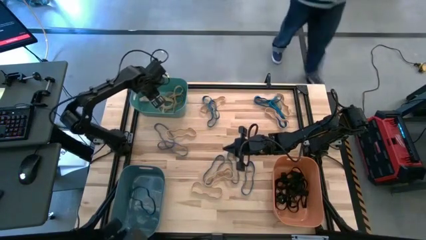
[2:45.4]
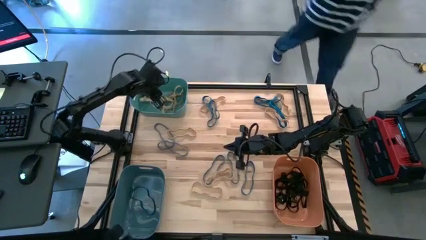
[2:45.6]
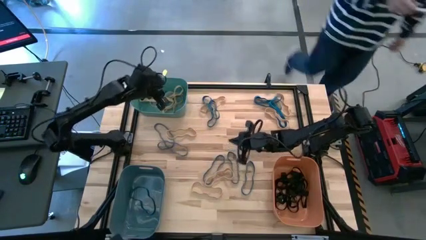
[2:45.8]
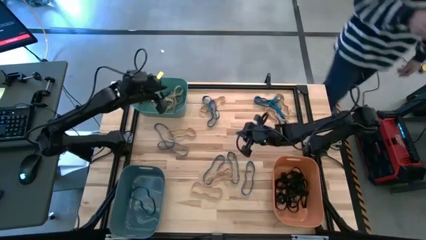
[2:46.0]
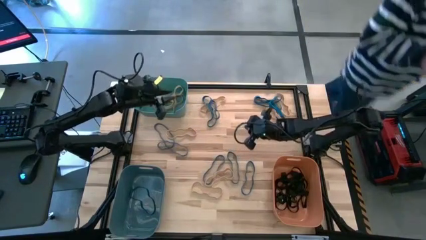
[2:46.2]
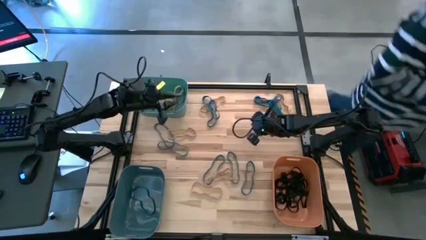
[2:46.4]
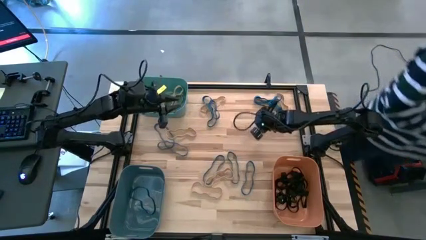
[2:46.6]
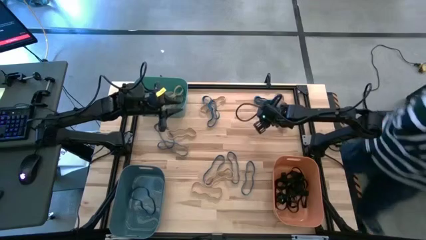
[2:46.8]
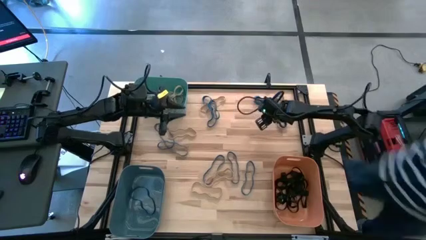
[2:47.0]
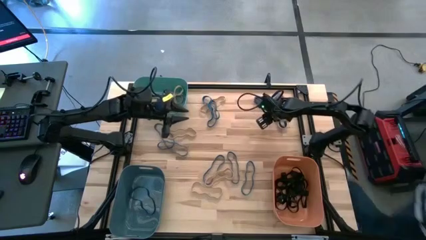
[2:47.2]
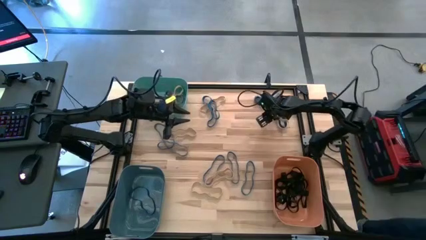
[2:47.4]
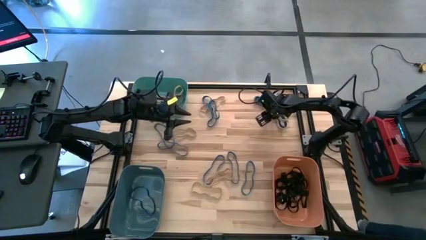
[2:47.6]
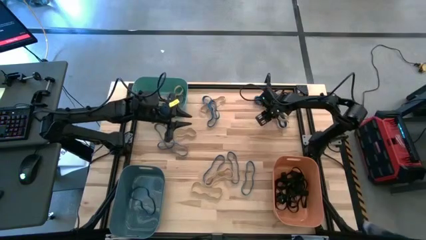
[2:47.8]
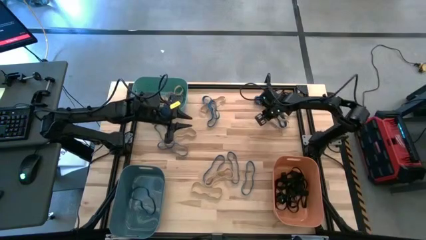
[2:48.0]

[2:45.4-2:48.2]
Task: Sort rubber bands into baskets
Put the brown rubber band into the green bin

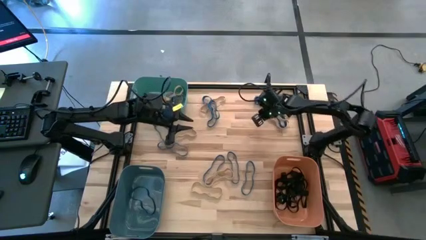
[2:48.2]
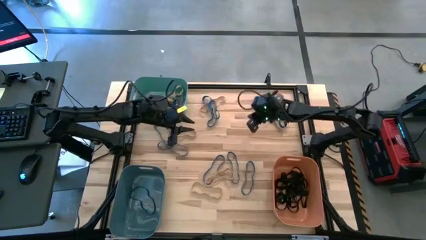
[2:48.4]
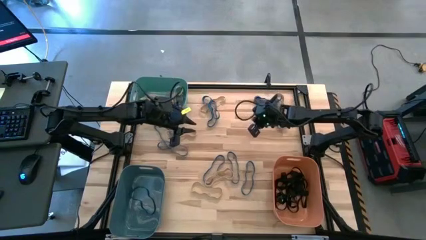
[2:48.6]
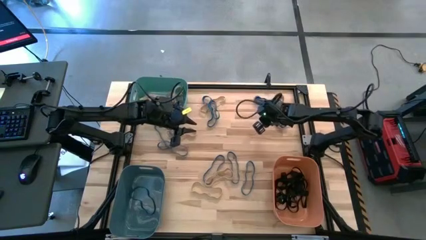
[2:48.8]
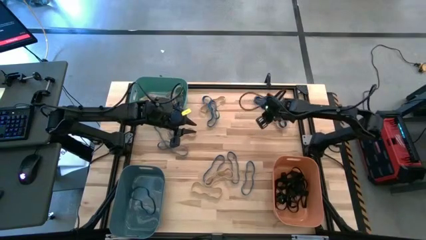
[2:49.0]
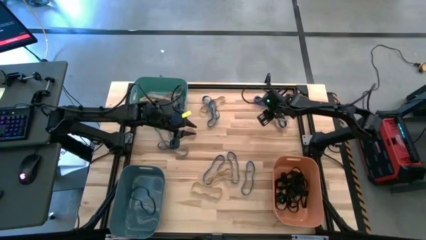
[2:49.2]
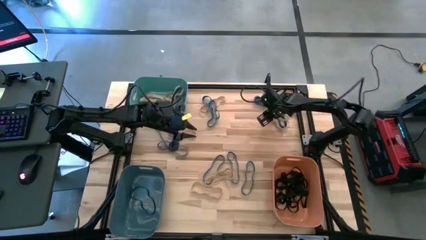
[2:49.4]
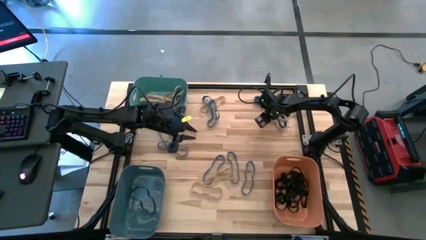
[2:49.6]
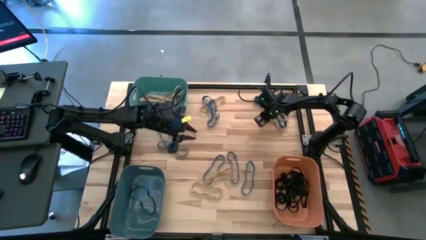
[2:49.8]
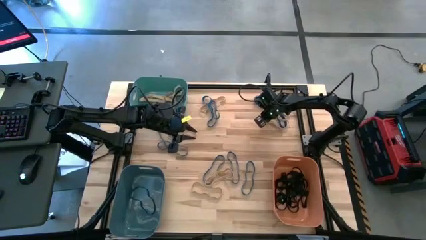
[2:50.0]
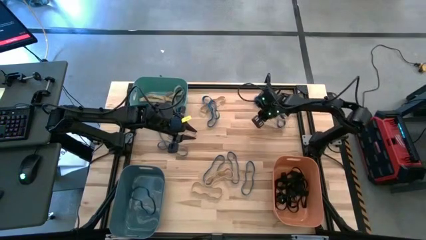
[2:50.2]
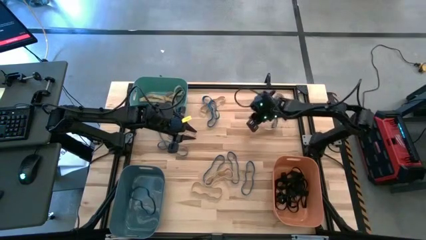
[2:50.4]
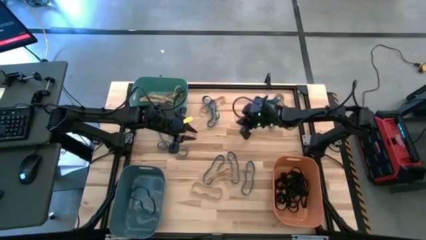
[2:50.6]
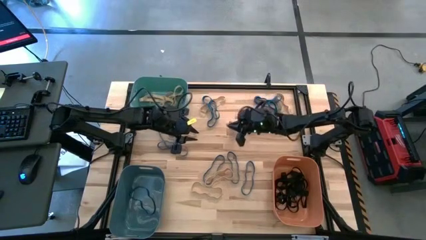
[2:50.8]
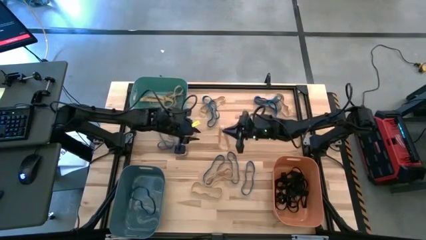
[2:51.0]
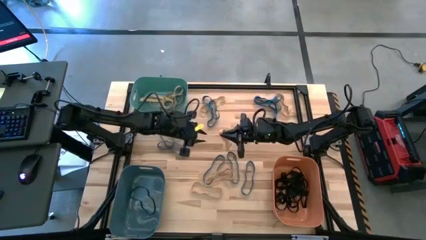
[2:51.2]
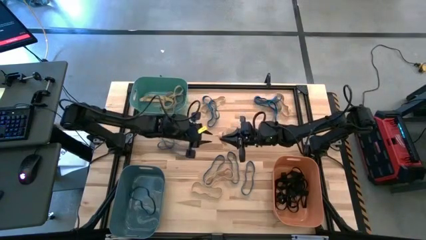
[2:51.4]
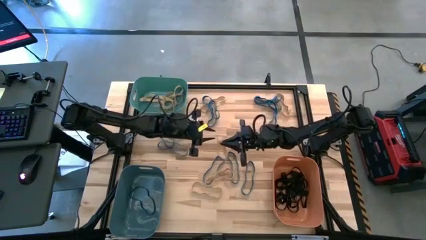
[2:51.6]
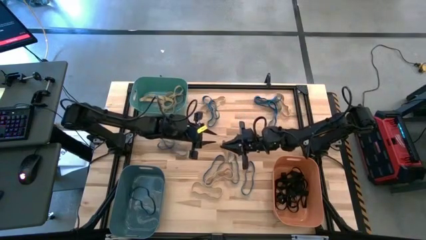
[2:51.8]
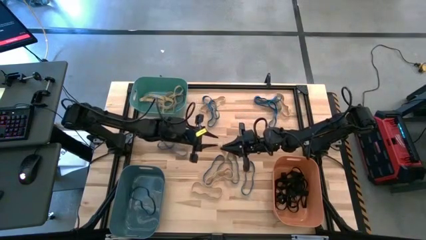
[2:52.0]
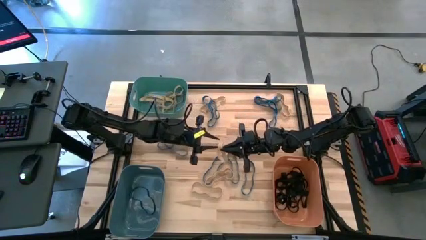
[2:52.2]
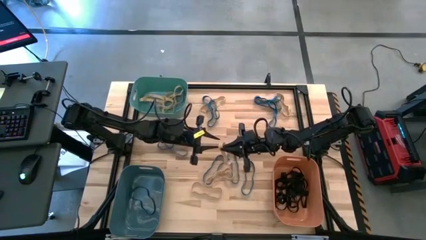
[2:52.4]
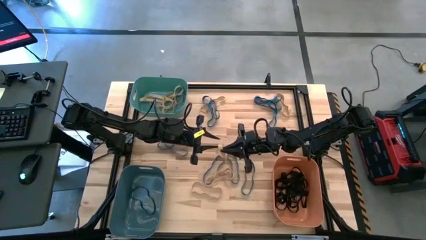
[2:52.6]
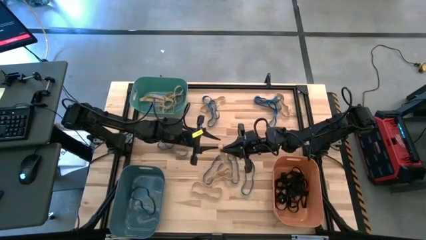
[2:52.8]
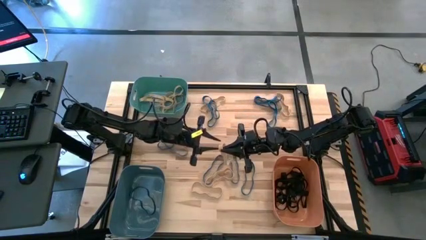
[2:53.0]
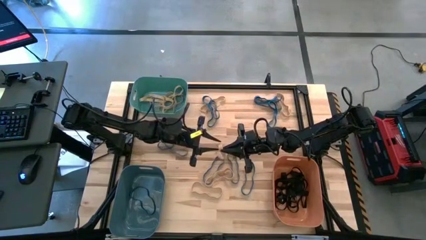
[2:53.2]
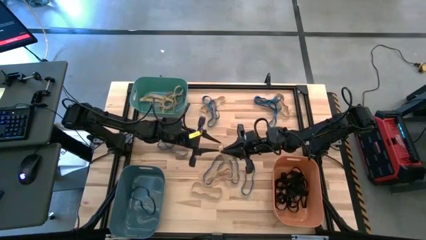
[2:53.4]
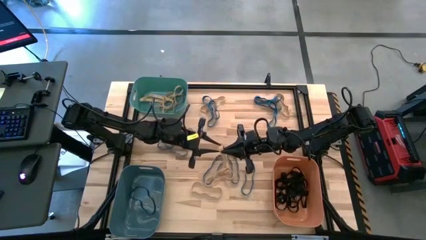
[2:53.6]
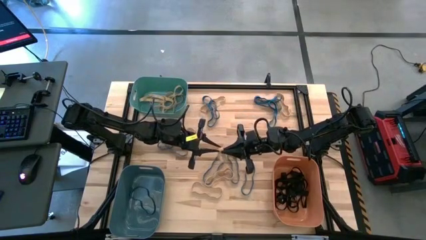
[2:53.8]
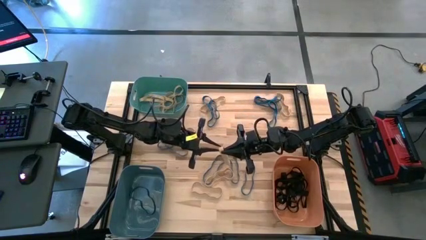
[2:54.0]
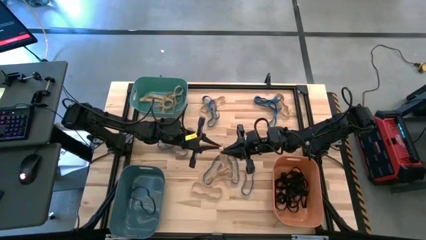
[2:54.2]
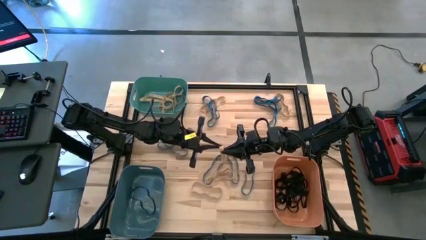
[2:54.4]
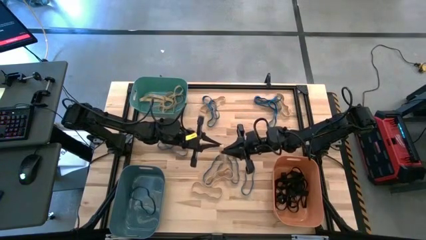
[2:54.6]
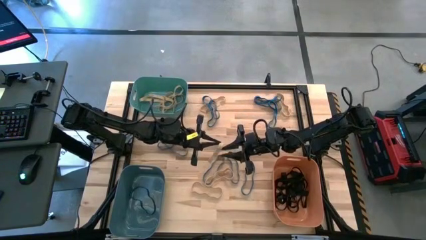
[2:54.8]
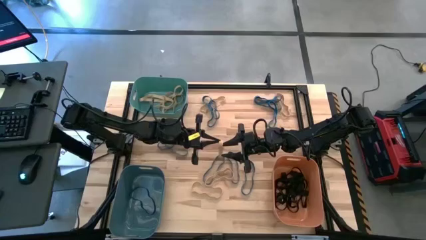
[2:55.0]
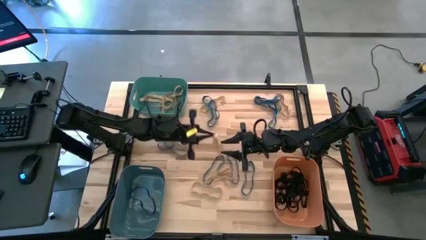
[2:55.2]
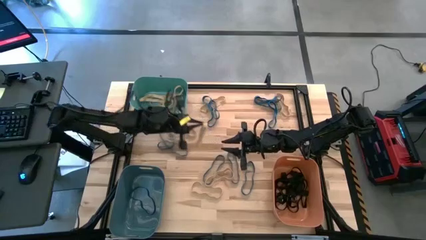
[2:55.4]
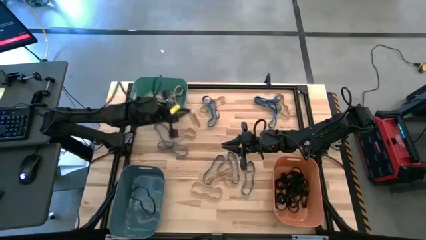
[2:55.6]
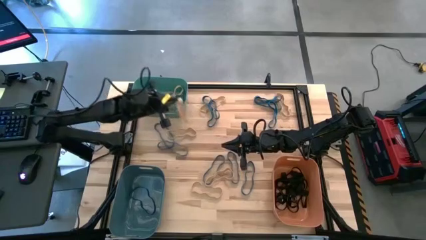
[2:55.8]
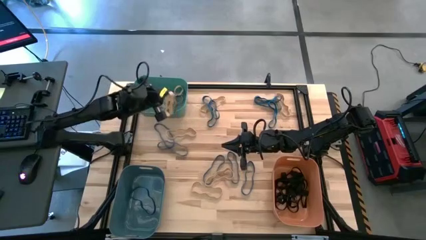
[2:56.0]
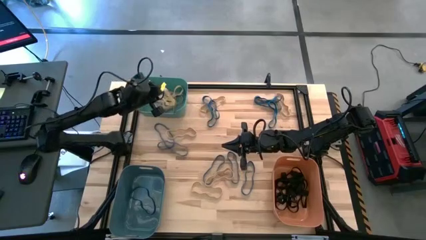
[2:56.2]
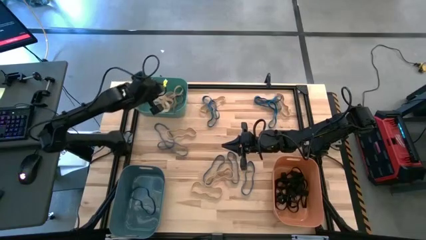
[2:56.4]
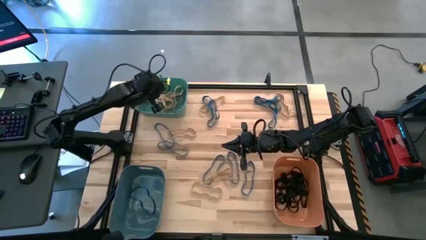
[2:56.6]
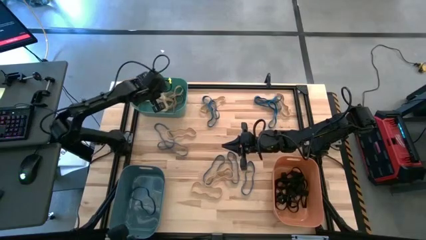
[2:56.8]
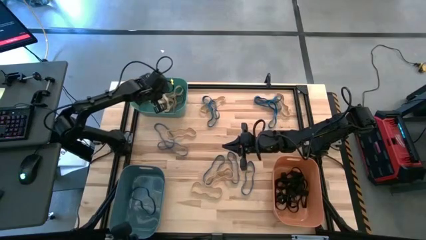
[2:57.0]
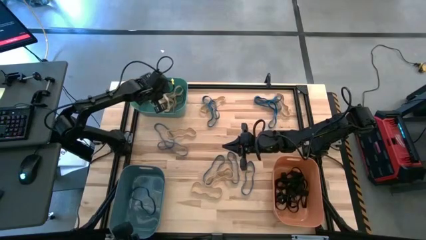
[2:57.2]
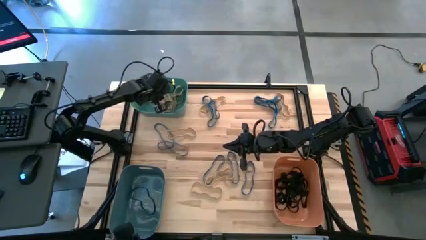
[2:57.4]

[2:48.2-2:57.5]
Put the brown rubber band into the green bin

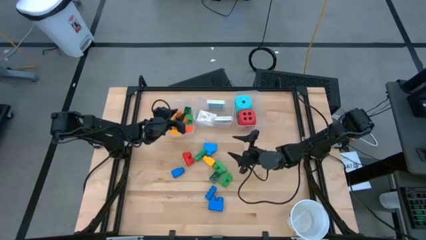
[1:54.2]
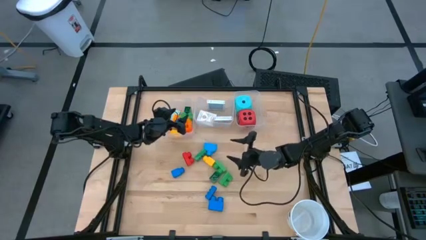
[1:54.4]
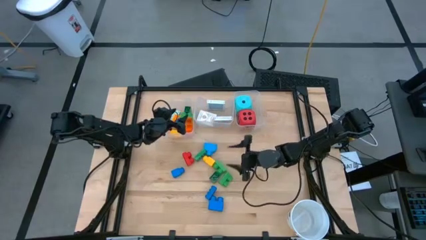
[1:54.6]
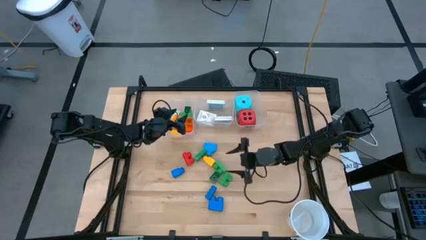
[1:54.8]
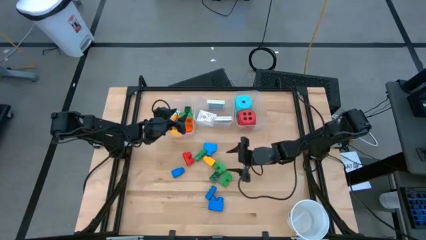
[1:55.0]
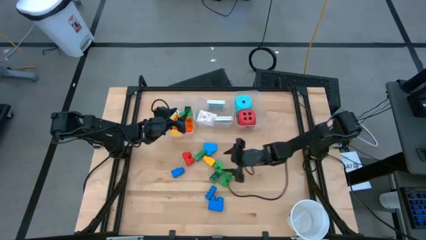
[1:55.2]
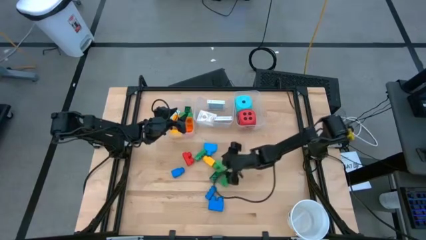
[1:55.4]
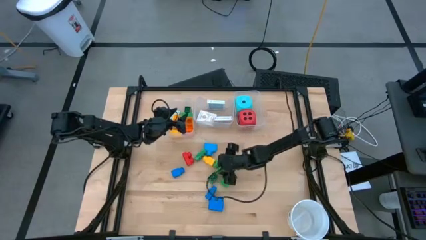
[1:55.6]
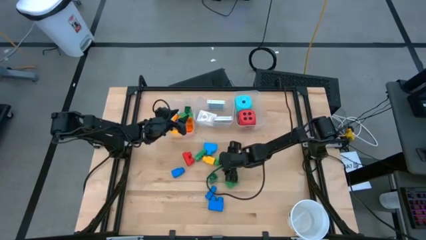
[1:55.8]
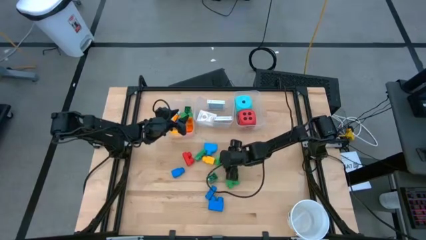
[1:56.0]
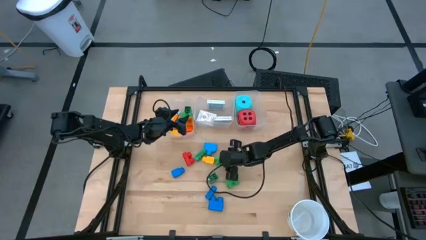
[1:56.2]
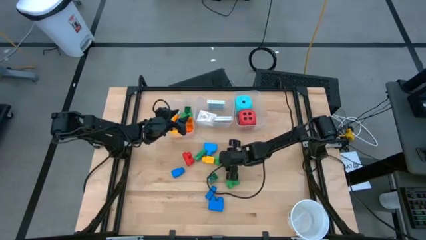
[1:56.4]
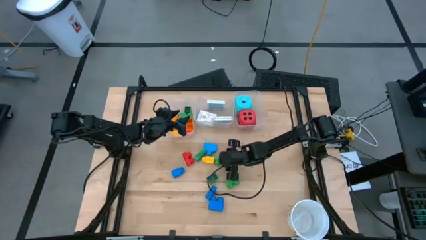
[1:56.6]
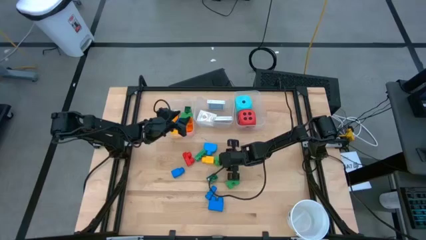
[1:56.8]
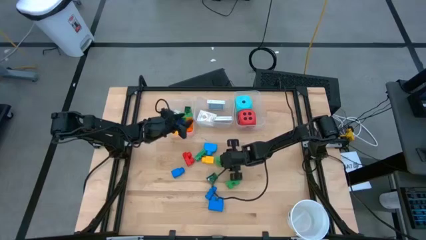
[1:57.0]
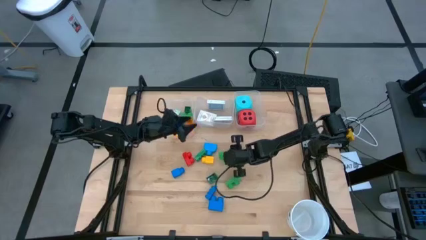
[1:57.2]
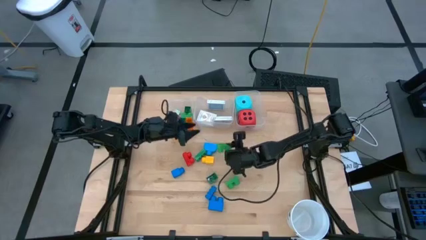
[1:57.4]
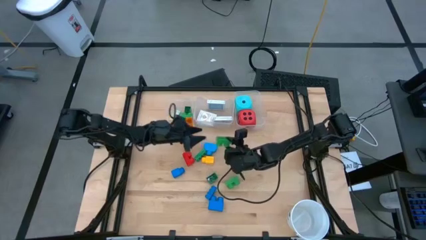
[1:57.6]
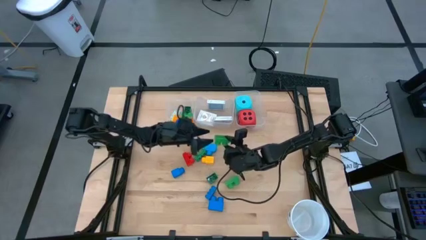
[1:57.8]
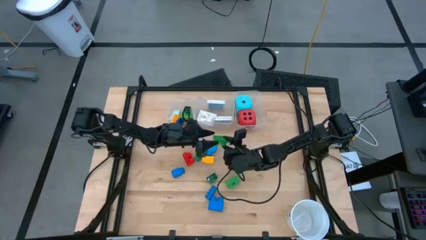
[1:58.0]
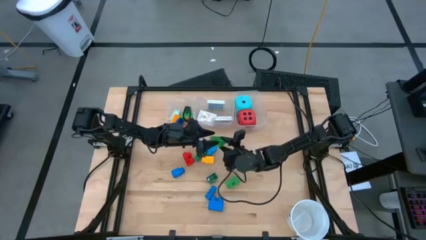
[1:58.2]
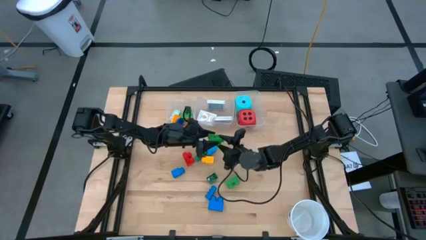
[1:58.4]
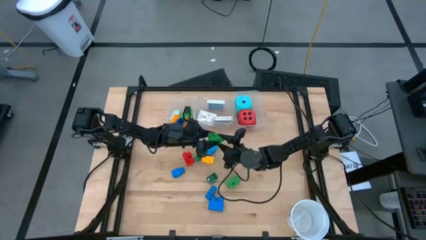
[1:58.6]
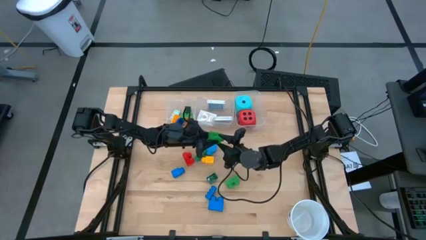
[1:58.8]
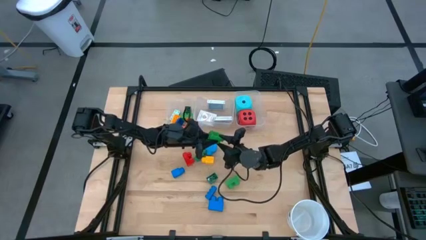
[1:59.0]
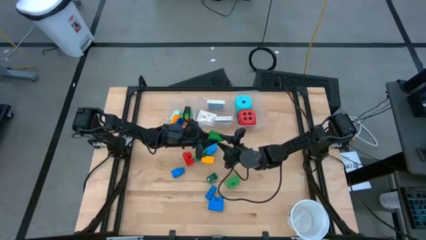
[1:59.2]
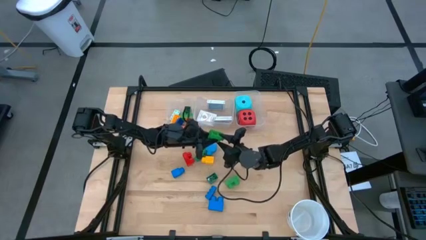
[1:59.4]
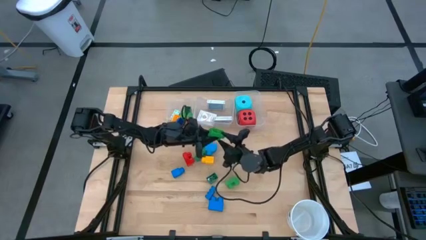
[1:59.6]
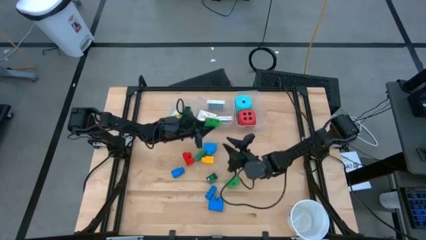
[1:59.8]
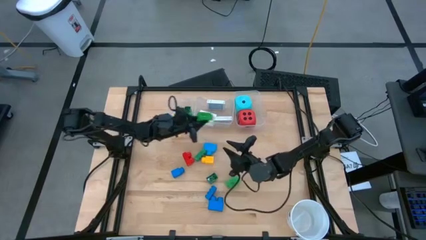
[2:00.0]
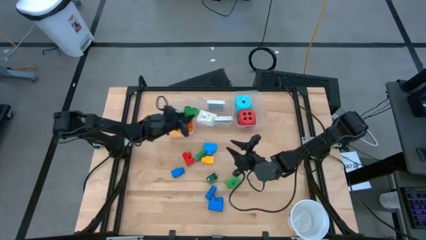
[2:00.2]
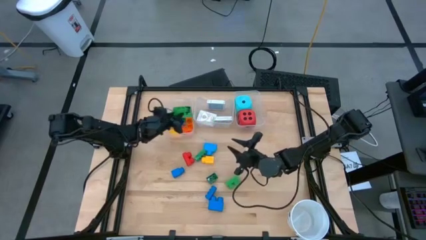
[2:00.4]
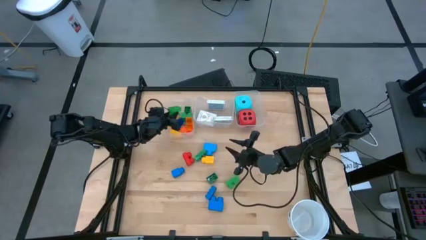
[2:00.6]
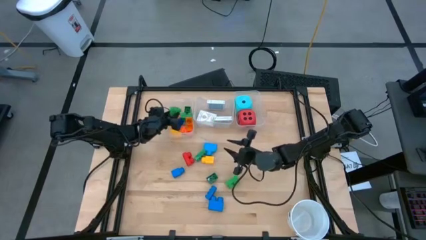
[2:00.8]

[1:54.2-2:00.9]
Task: Pick & Place Toys
Put the green game piece into the left transparent bin
